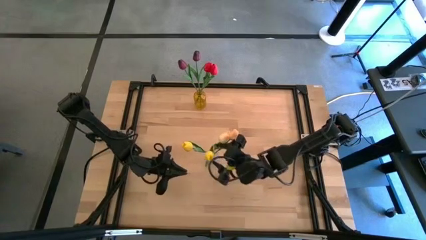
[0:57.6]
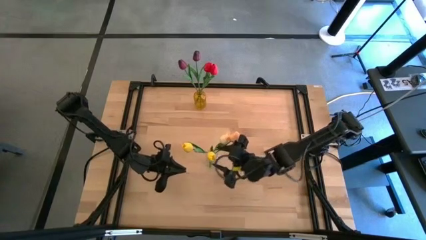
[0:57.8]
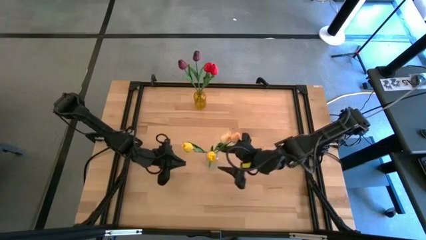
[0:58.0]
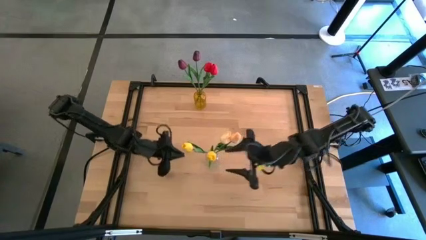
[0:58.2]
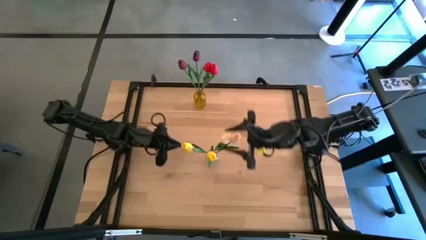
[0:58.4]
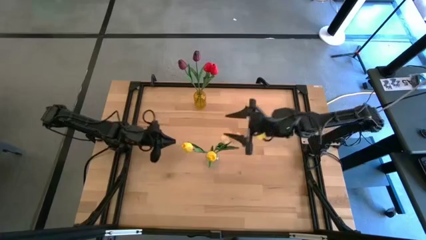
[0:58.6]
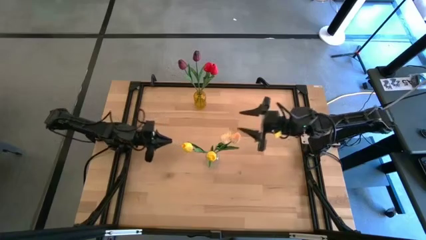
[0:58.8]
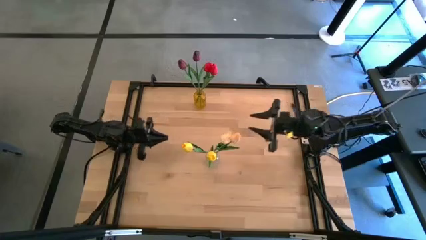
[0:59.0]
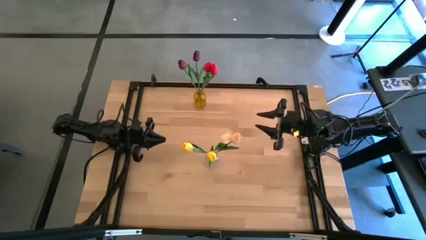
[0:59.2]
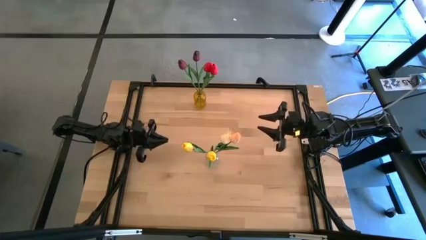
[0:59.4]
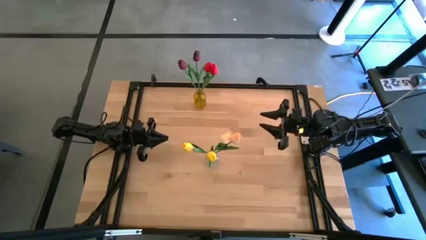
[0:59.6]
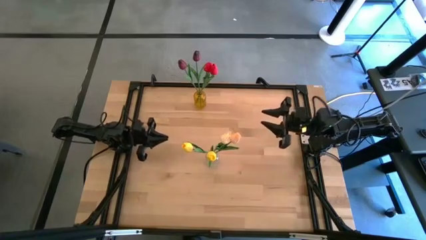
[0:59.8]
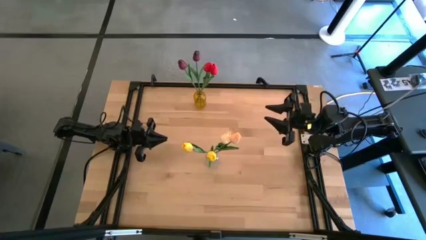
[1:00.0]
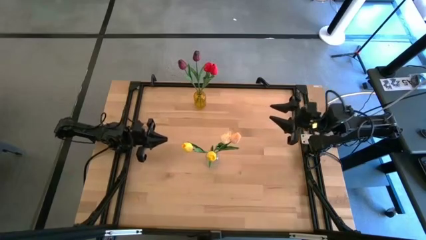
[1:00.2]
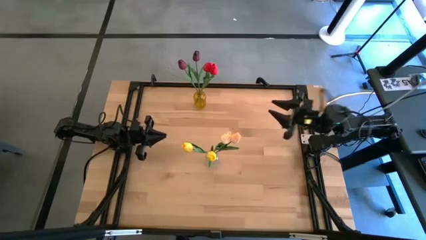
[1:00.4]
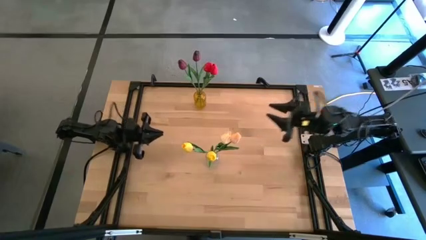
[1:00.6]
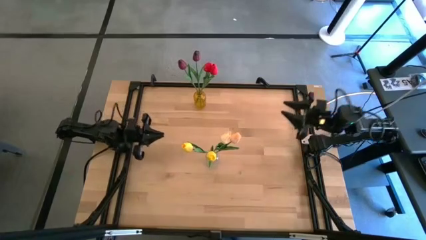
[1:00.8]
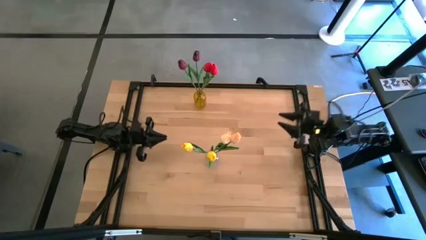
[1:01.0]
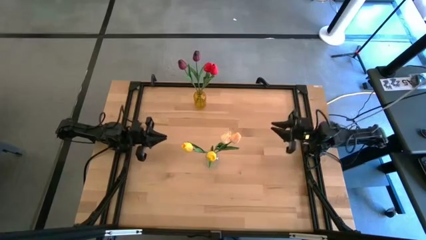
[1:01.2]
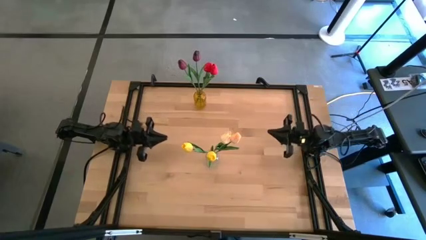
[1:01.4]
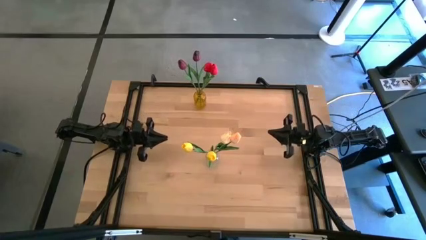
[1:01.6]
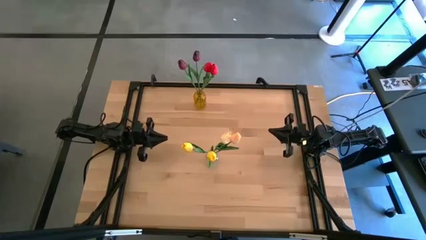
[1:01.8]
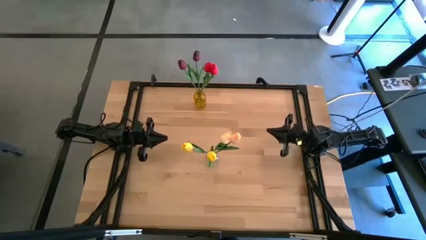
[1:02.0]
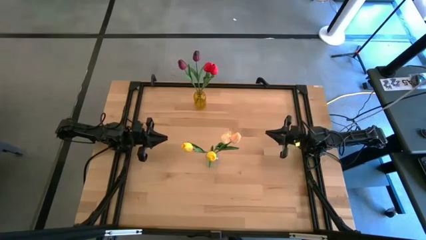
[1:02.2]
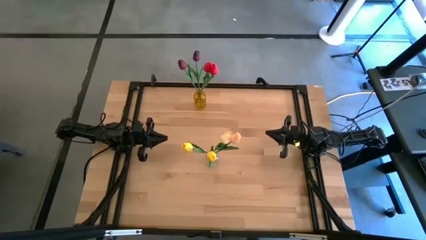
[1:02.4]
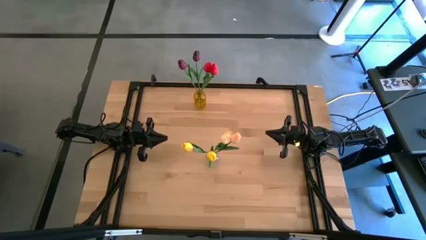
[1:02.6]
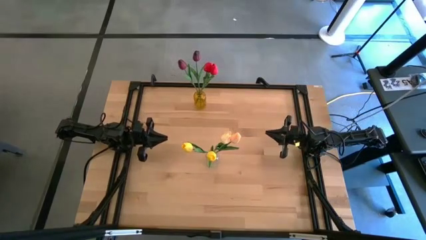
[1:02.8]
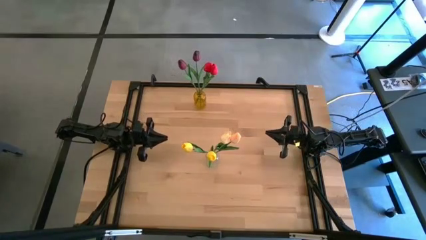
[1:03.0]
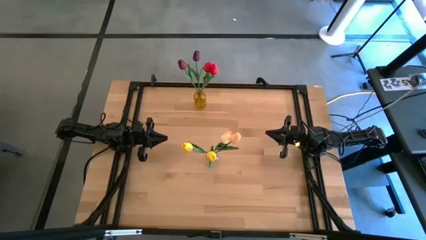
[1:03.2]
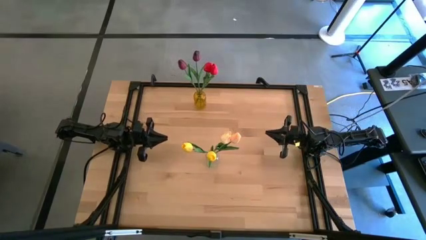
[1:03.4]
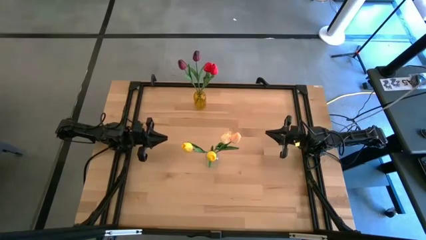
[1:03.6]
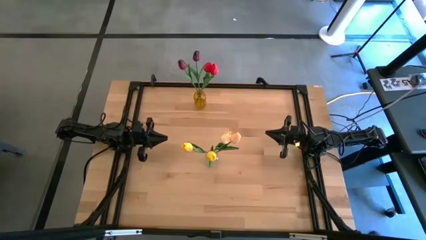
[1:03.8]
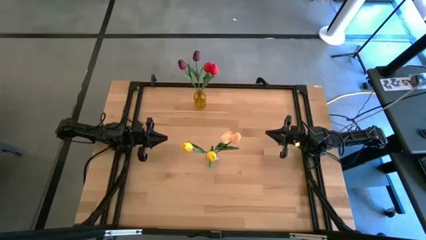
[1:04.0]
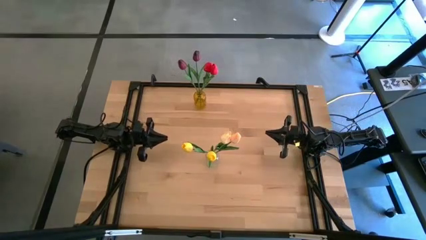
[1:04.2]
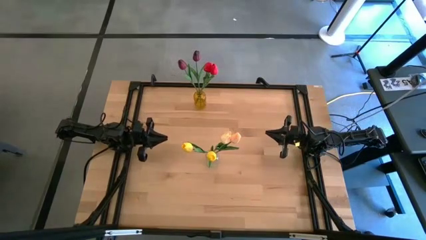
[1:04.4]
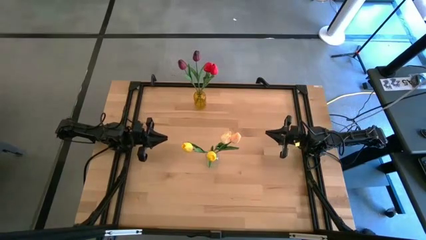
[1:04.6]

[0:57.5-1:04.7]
Task: Sort flowers into vase by color
Return to Home Position
